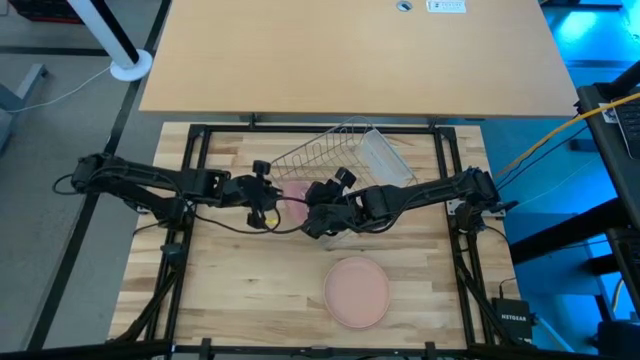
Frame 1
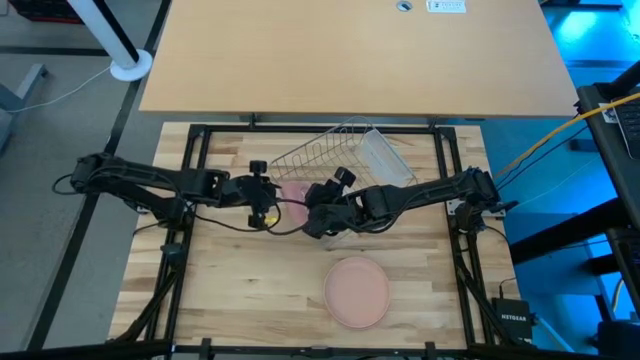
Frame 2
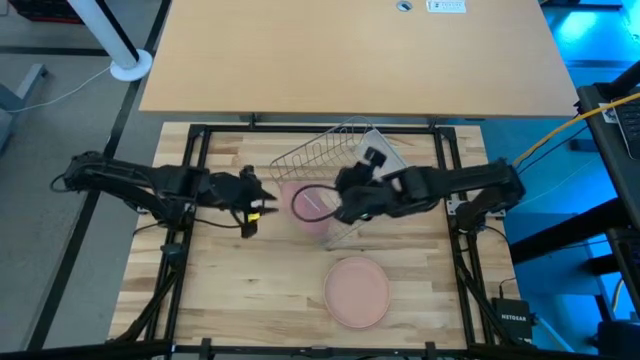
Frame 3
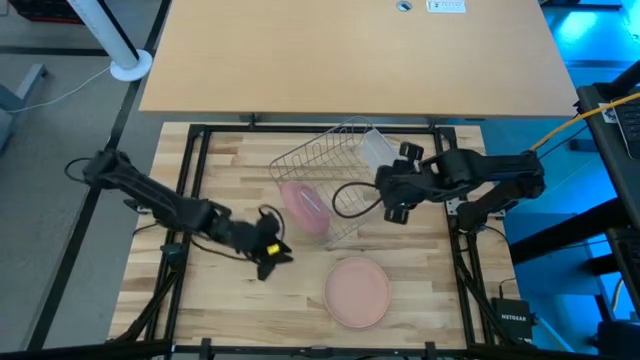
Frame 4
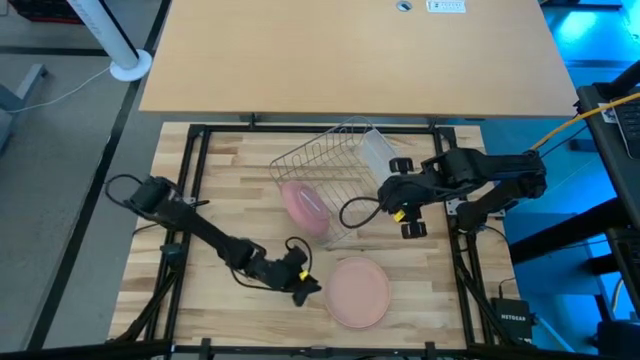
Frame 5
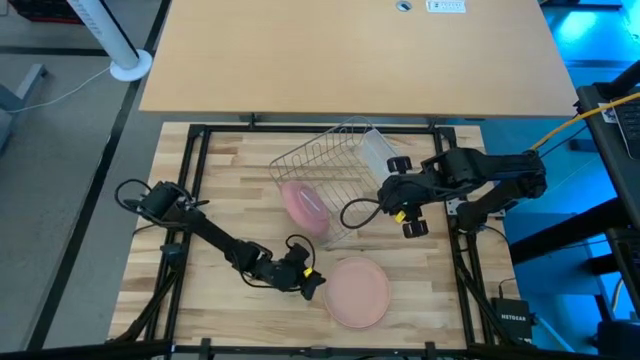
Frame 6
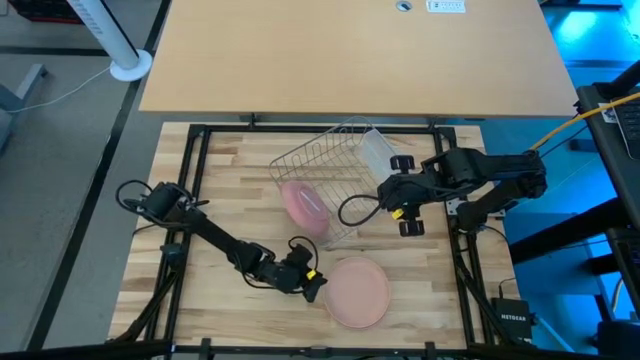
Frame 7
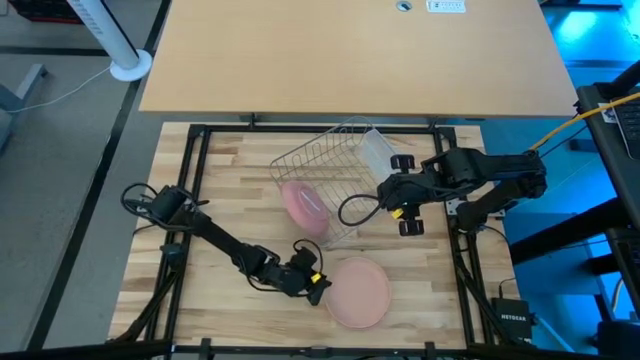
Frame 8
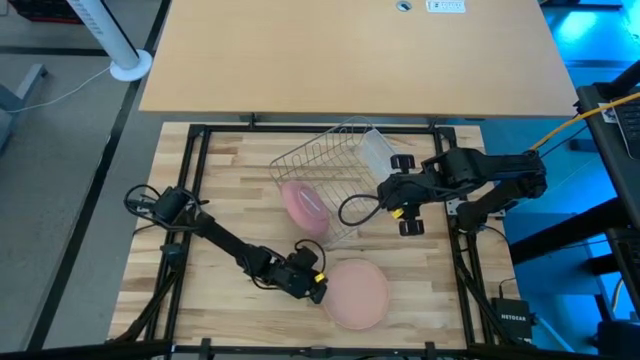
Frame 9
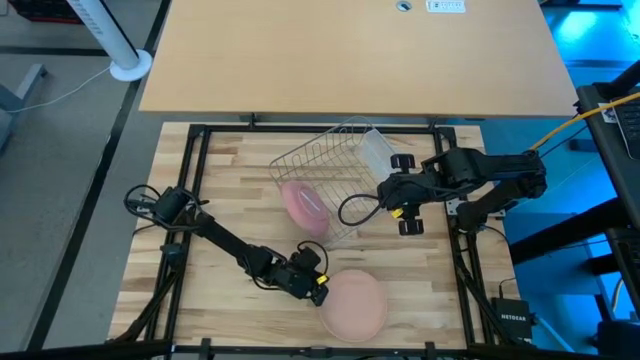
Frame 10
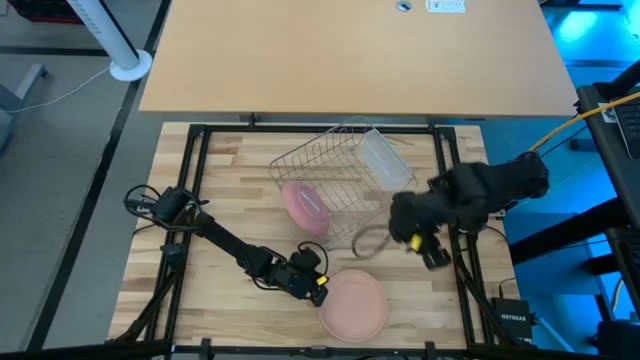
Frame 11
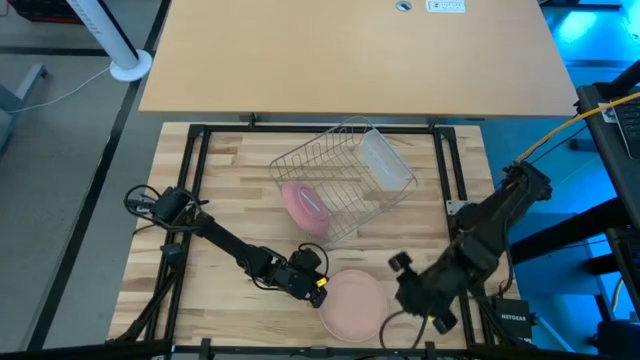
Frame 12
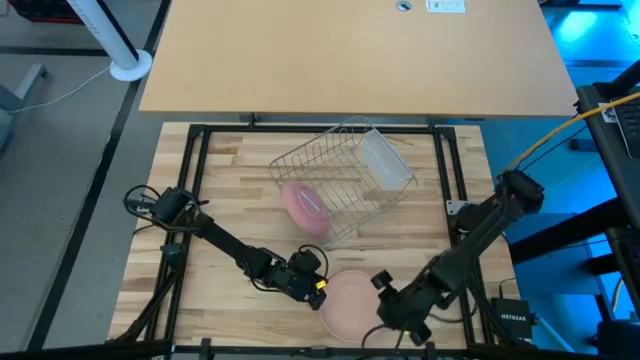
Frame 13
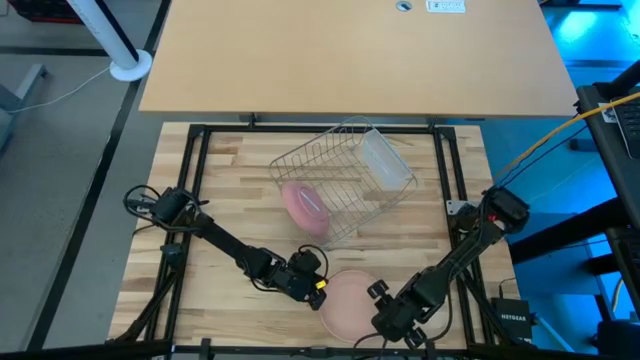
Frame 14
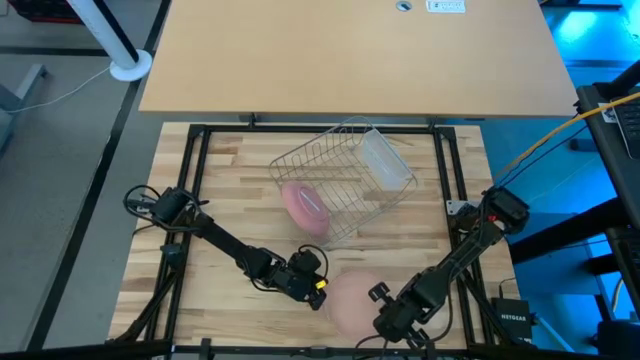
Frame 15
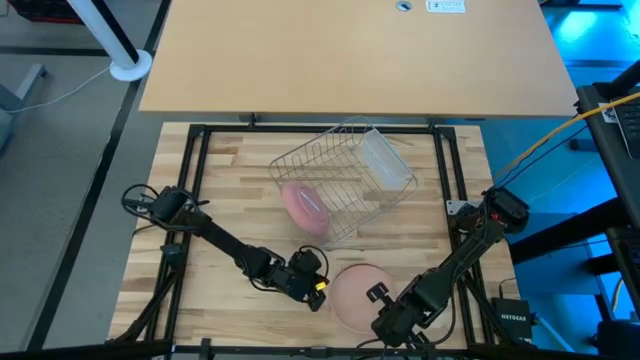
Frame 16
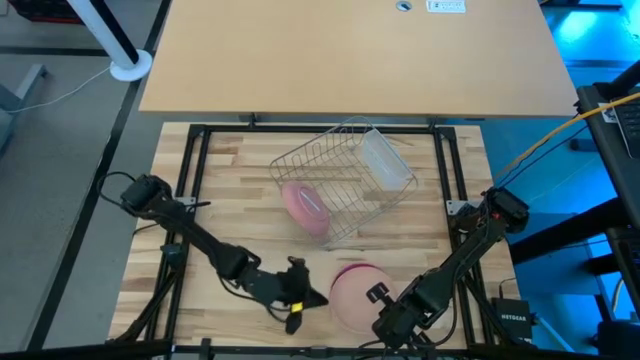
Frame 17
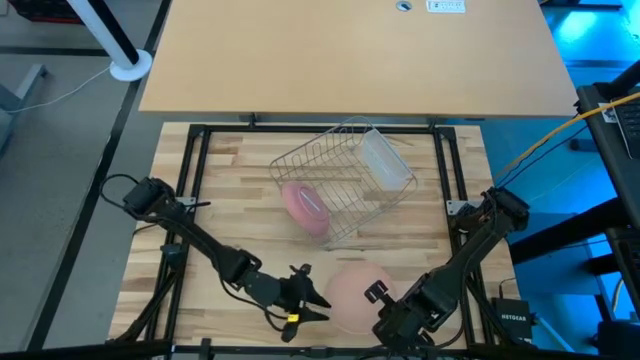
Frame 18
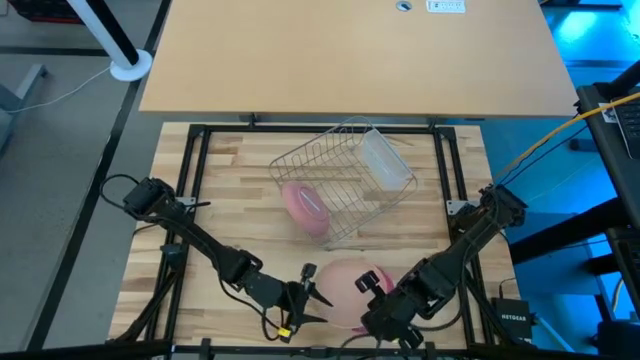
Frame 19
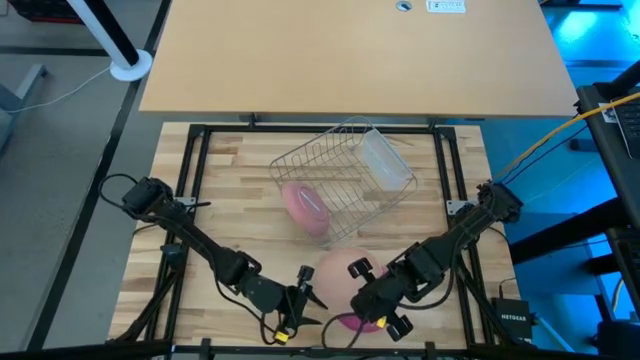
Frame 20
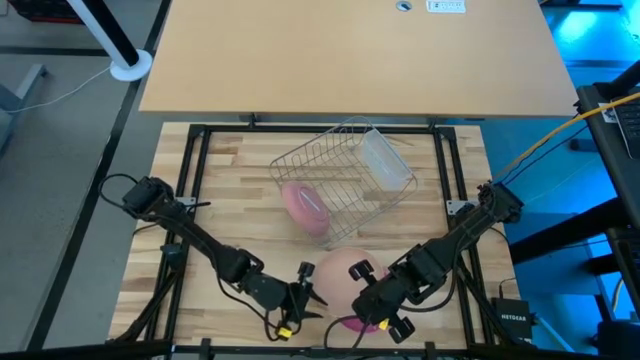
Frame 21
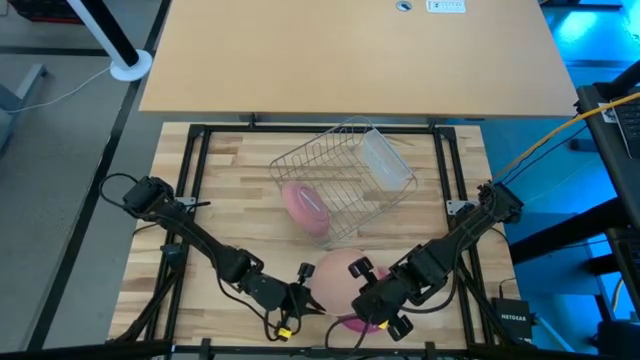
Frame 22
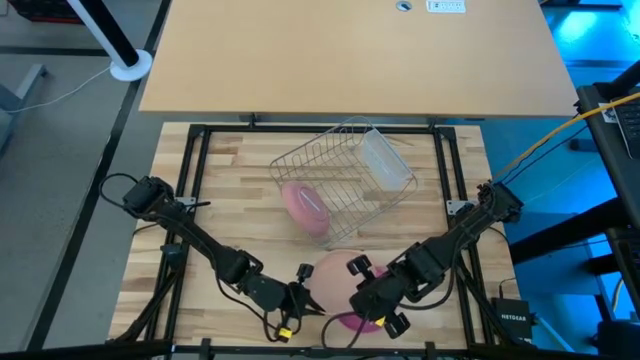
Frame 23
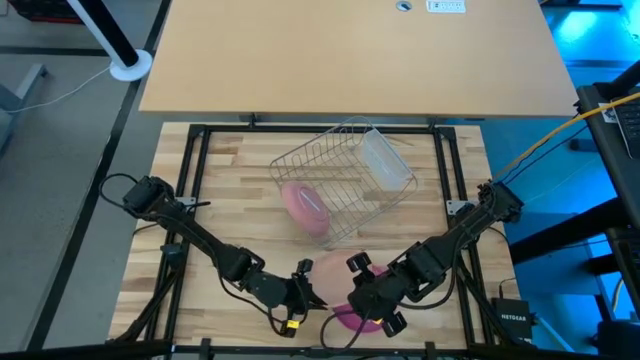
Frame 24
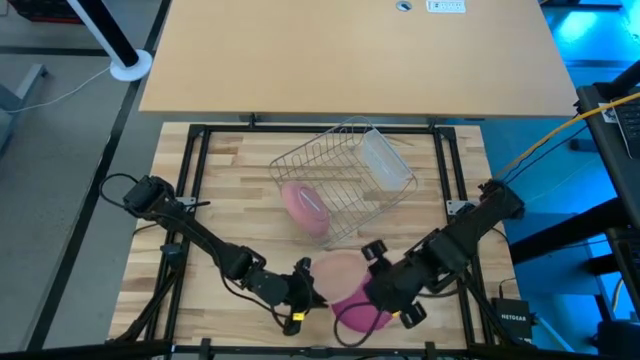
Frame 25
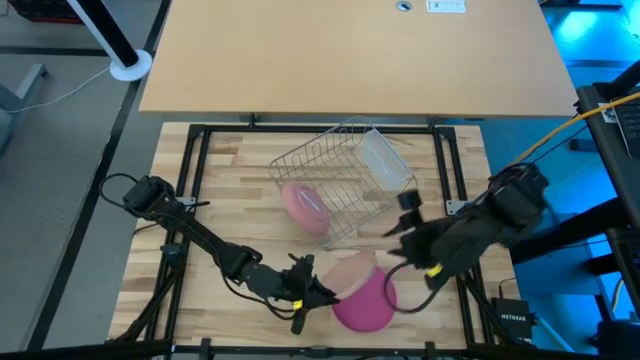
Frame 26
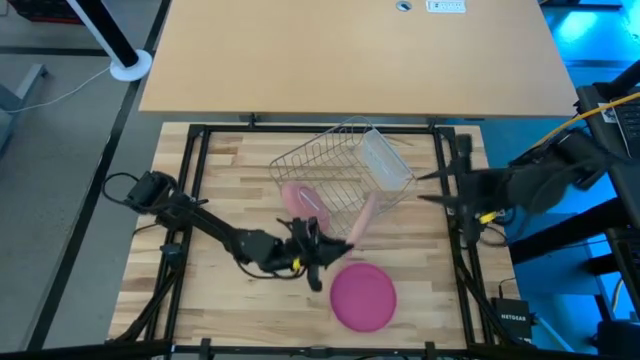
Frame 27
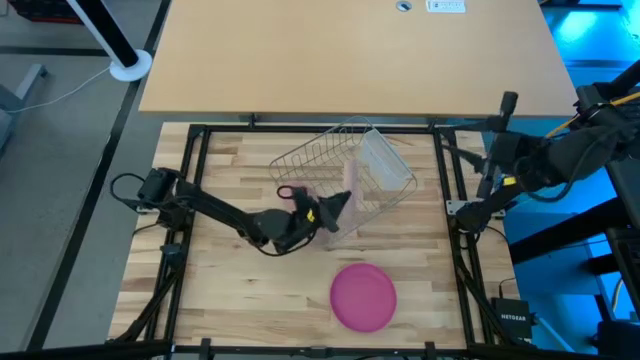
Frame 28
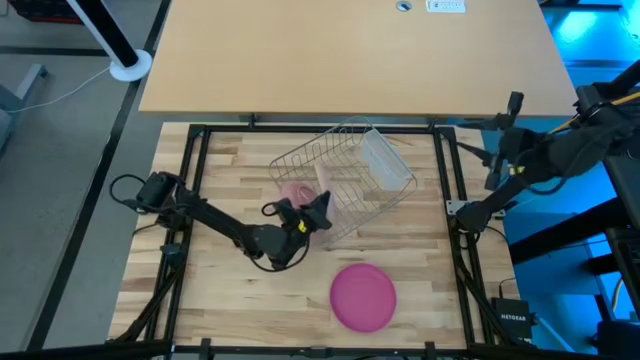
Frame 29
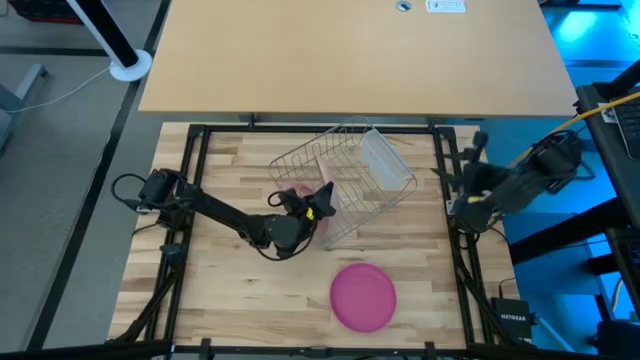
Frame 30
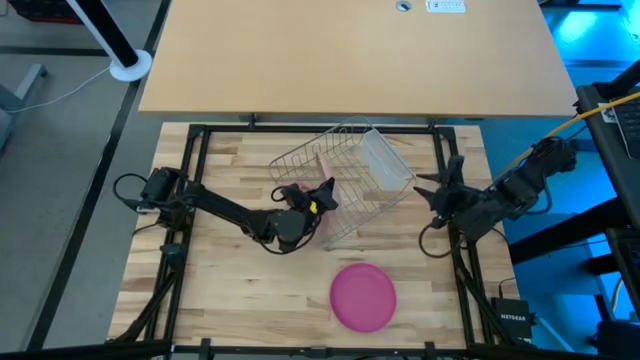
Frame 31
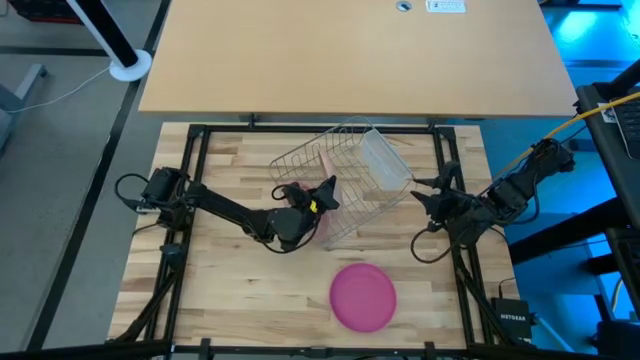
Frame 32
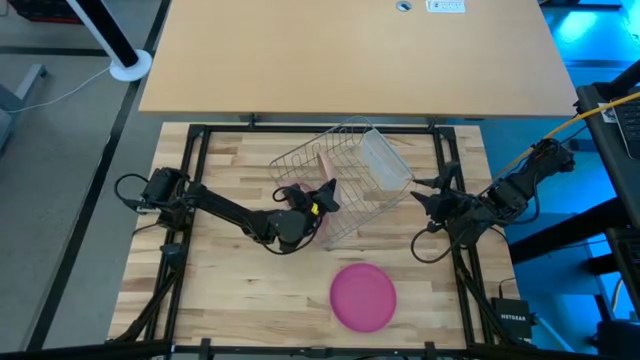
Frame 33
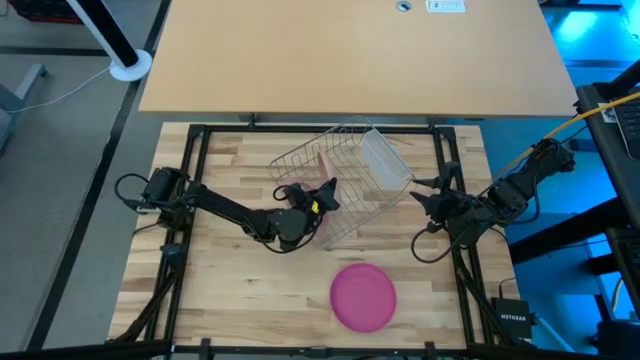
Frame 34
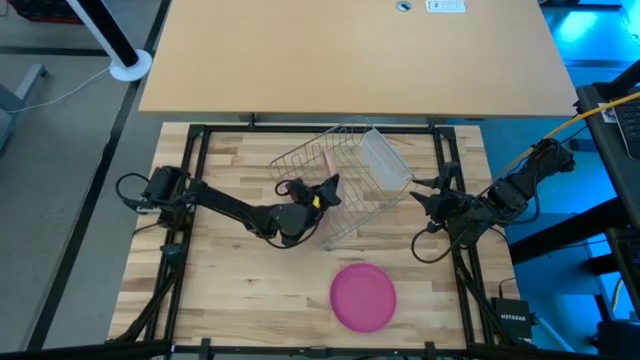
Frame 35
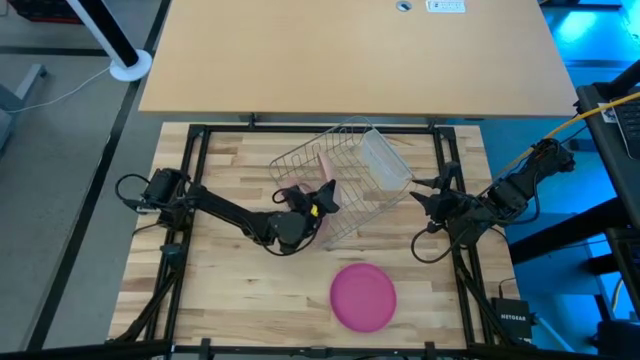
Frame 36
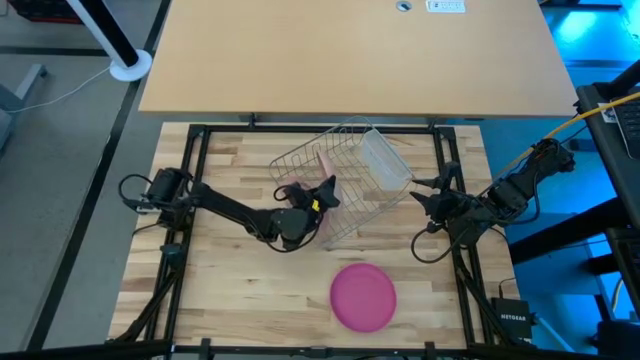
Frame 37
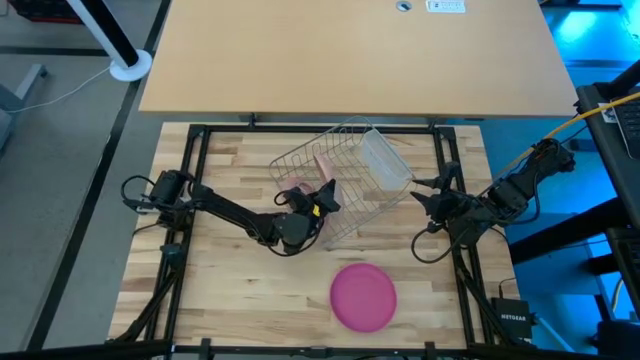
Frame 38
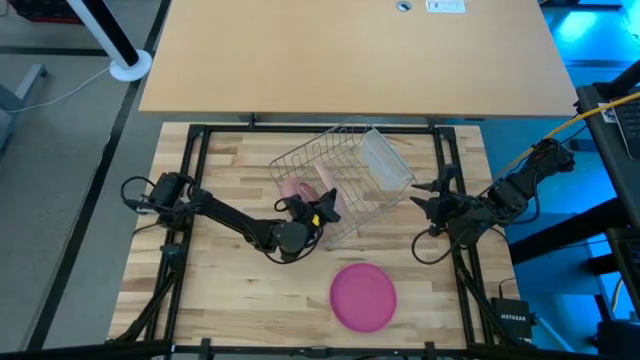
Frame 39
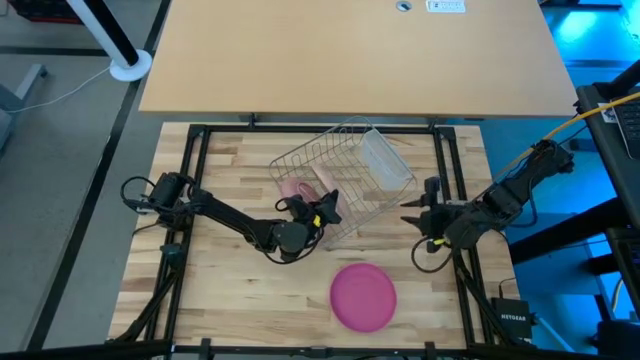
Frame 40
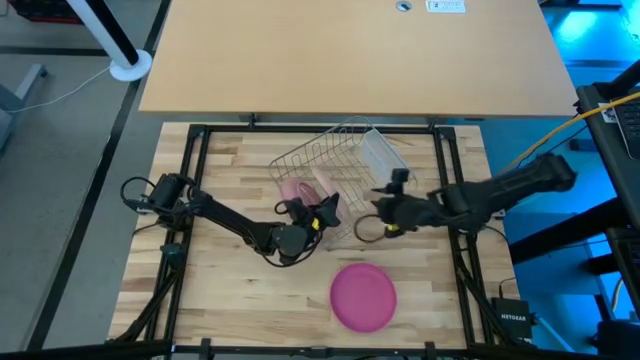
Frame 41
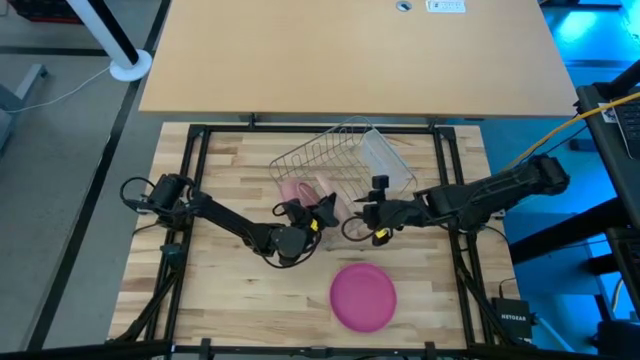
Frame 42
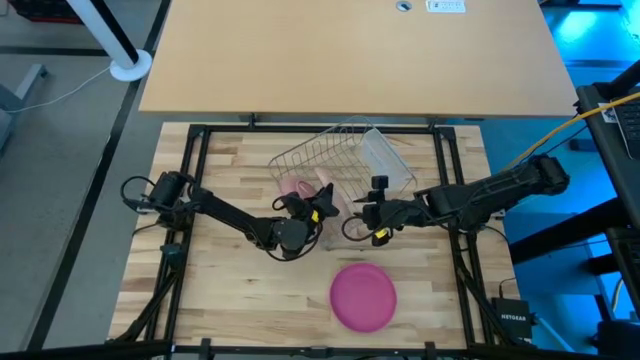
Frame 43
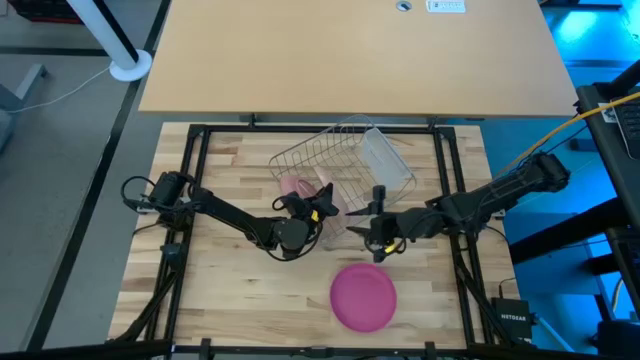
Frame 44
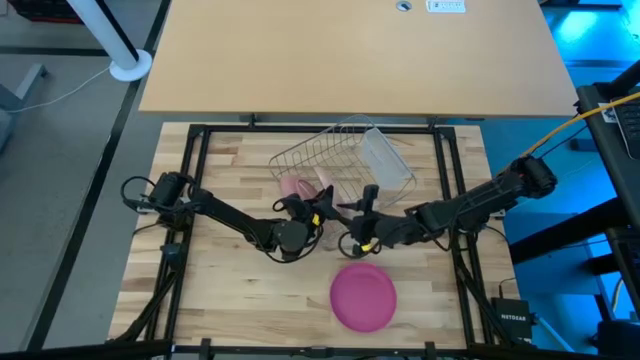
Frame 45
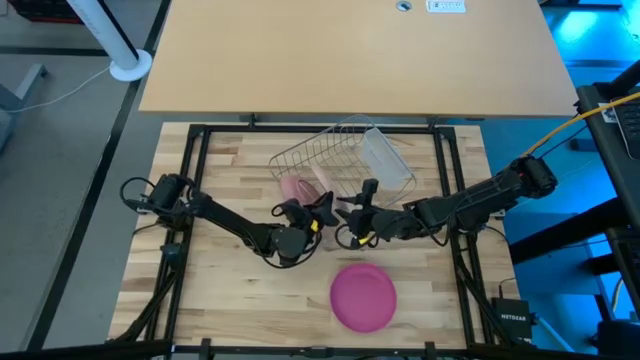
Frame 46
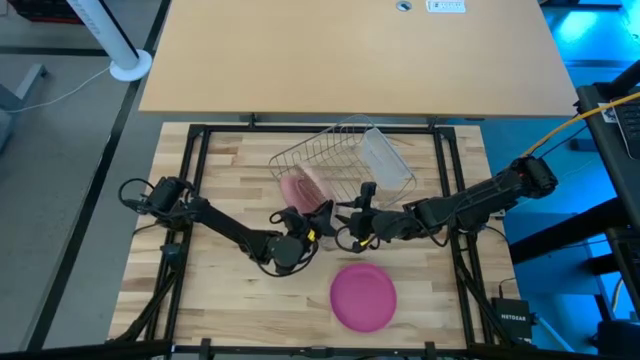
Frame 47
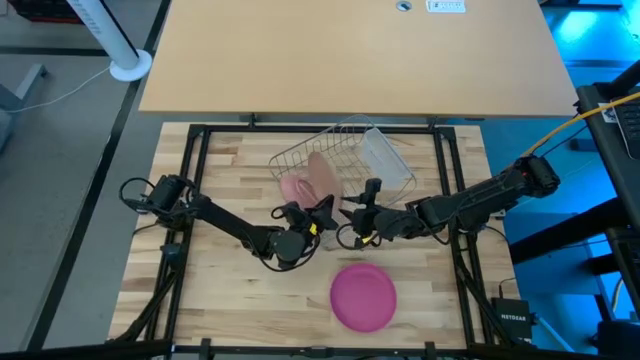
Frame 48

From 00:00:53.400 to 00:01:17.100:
Task: Sort dishes
Put the light brown plate into the dish rack
